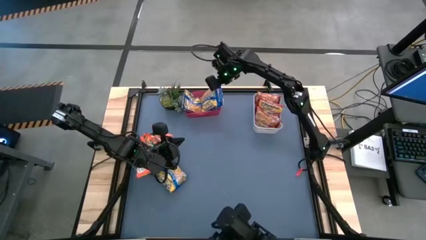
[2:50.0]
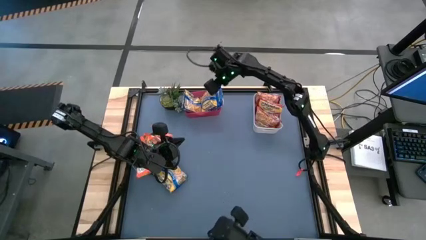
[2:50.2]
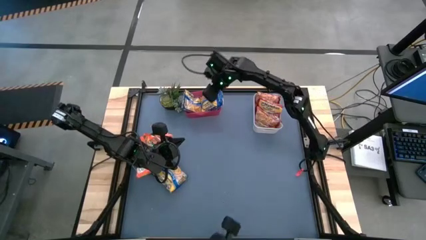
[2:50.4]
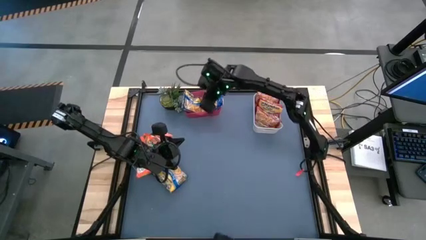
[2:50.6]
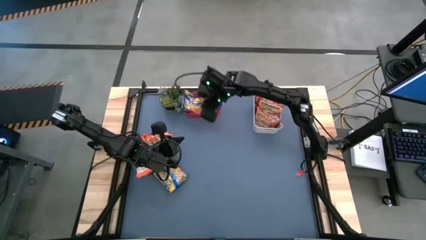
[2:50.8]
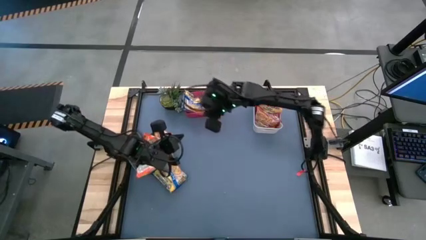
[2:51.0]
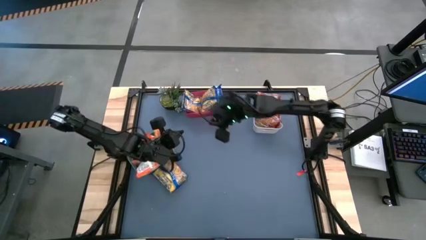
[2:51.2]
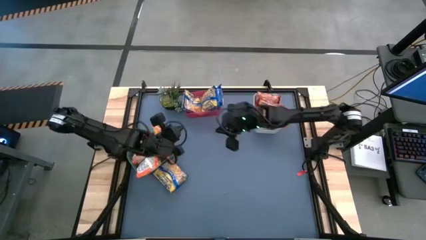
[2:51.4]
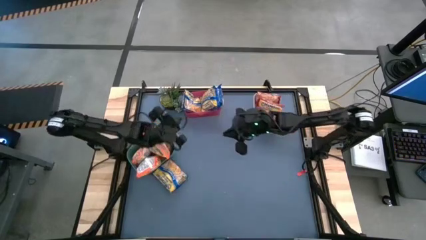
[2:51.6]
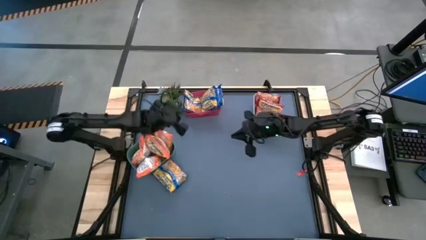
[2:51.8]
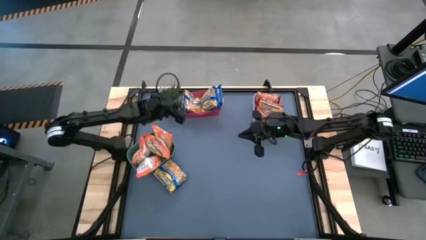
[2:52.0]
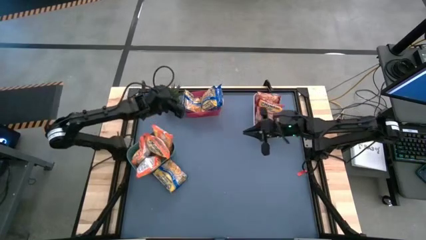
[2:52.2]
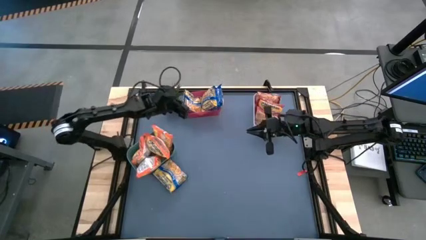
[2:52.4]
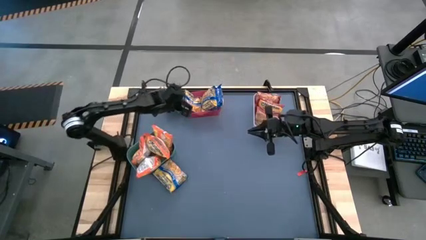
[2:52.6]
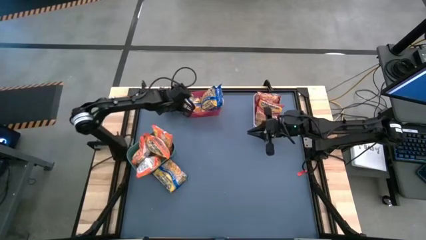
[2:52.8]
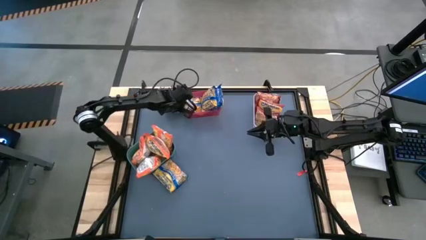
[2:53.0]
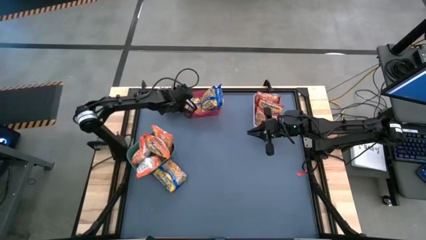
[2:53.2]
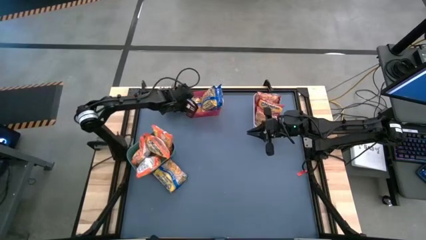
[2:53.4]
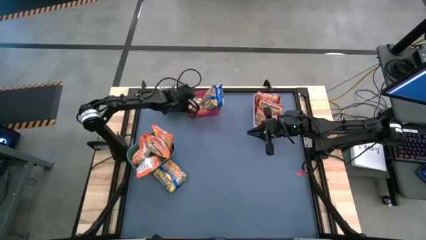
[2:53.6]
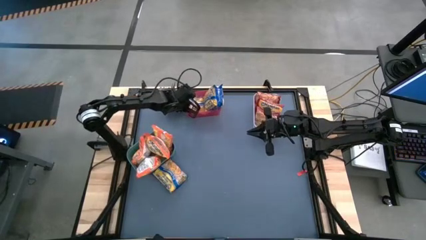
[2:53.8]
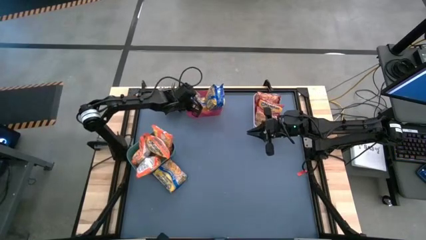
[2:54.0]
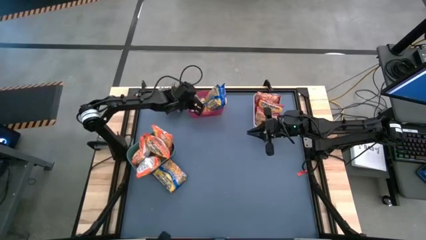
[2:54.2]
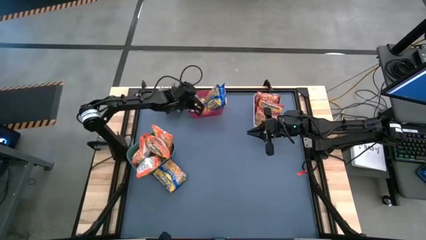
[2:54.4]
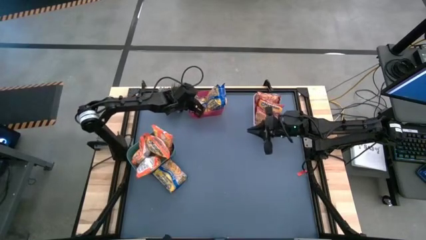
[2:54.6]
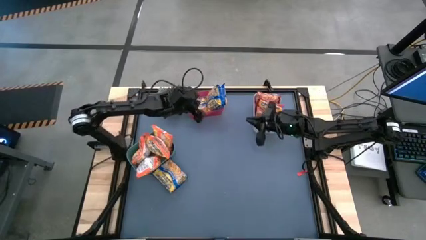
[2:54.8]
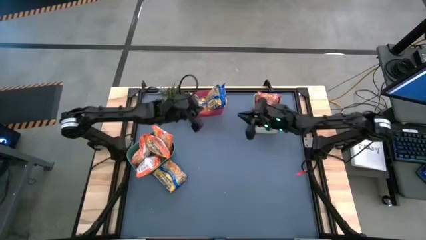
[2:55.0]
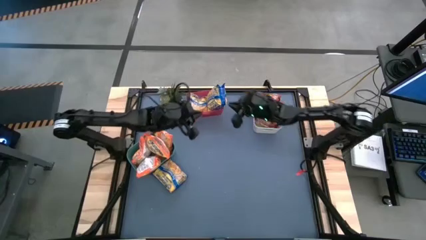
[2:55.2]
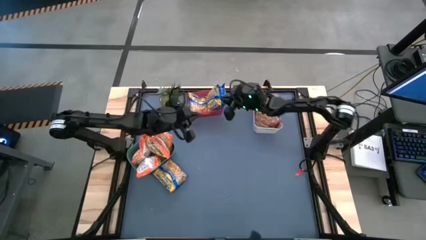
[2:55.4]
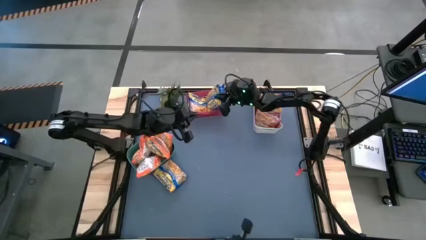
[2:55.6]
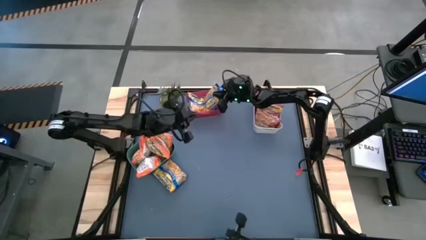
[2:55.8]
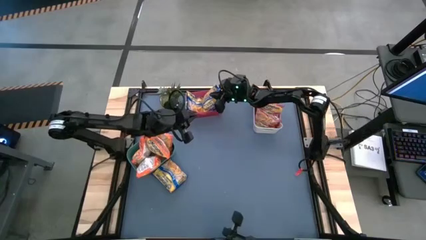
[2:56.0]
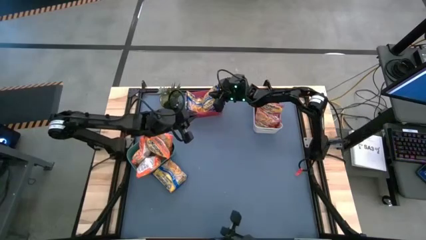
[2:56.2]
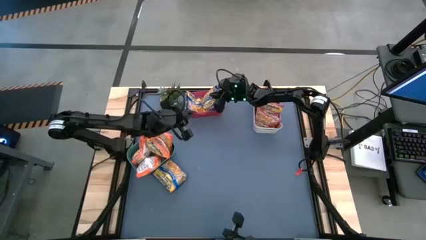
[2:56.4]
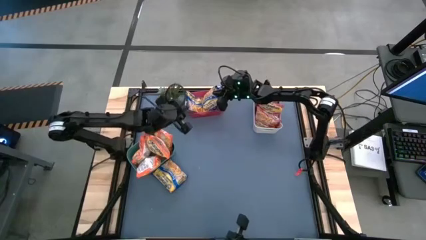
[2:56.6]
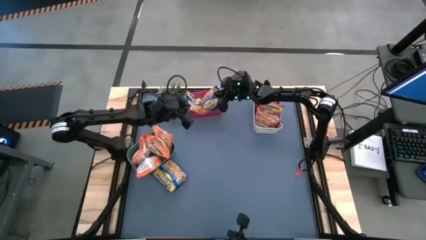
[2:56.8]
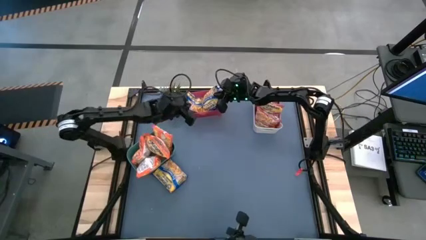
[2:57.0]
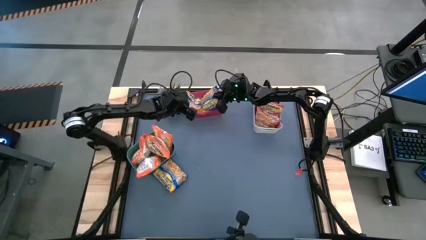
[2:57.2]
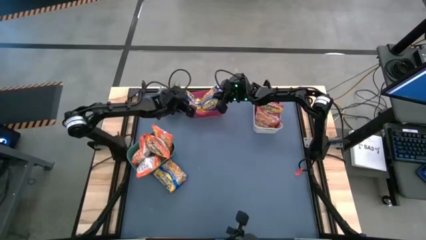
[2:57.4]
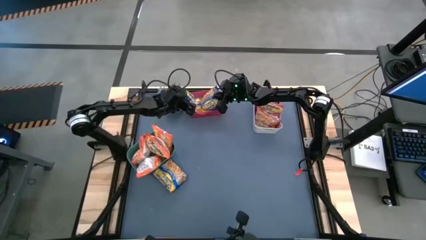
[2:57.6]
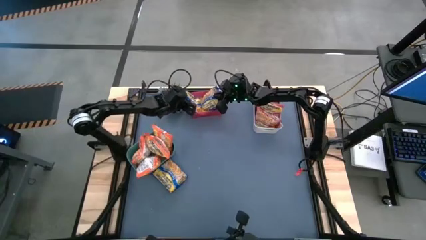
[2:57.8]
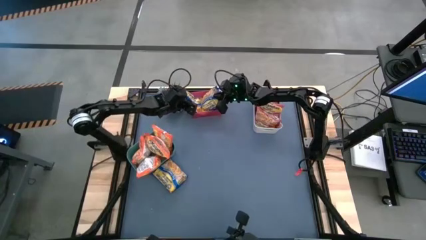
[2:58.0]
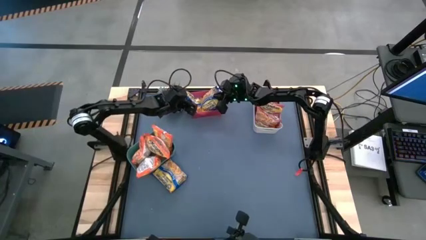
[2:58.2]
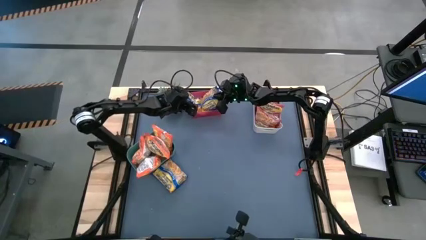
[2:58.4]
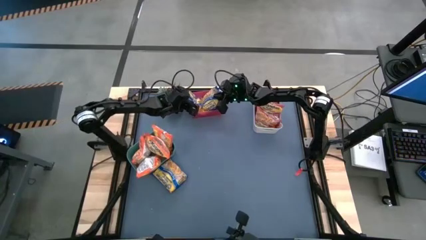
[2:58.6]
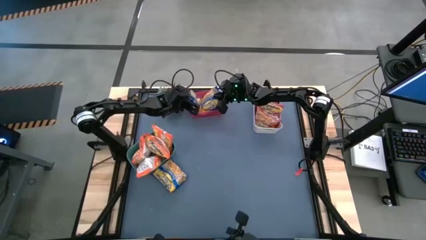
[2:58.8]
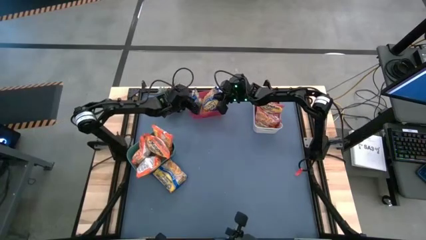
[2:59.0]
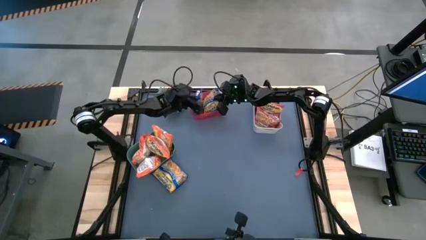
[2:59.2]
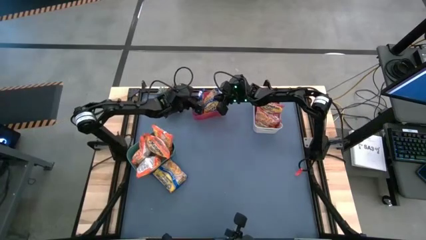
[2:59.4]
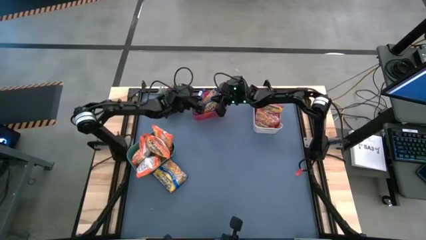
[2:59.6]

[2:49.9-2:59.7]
Task: Sort Maruchan noodles
Adjust the blue noodle packs in the red bin

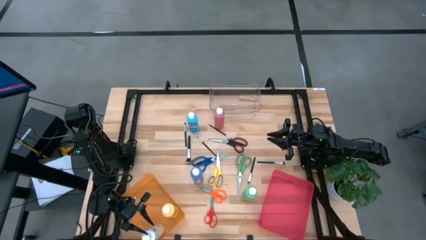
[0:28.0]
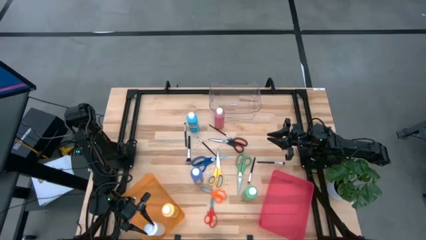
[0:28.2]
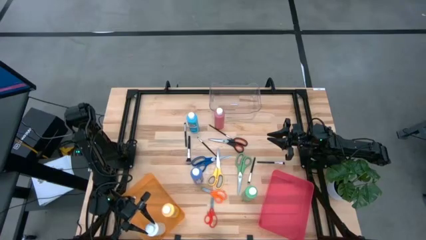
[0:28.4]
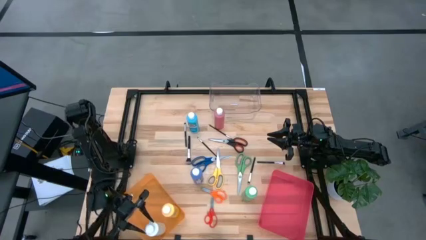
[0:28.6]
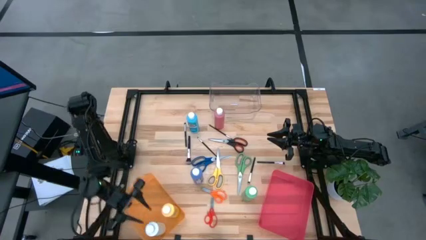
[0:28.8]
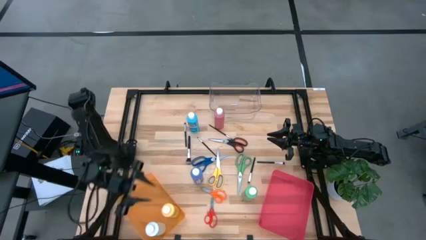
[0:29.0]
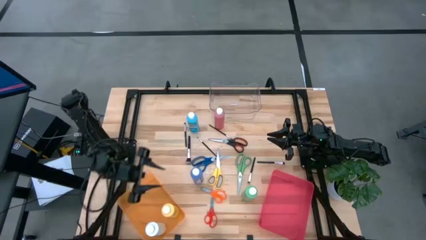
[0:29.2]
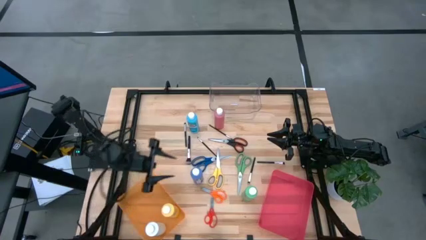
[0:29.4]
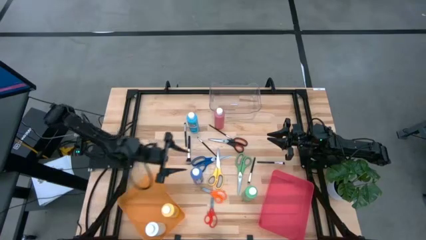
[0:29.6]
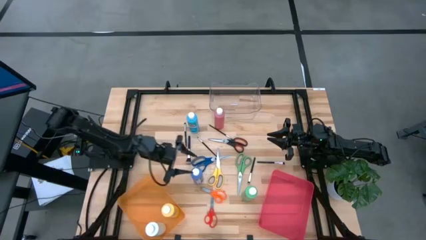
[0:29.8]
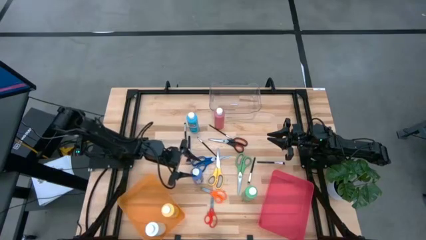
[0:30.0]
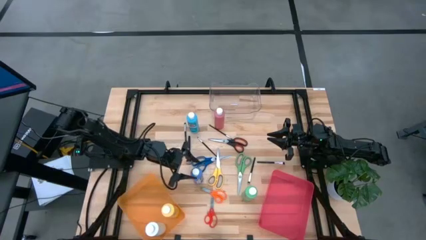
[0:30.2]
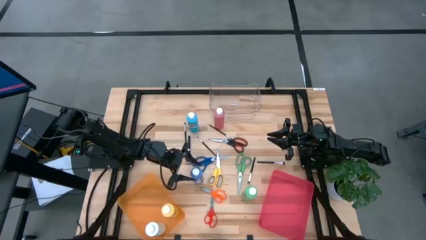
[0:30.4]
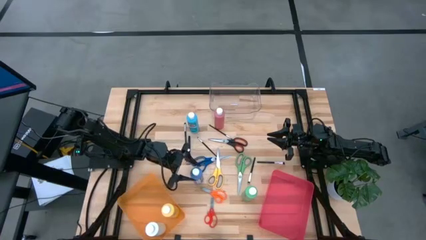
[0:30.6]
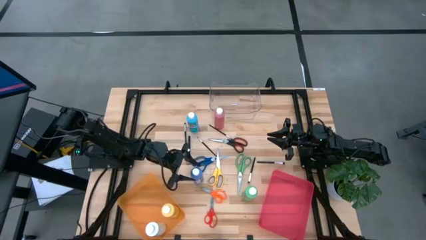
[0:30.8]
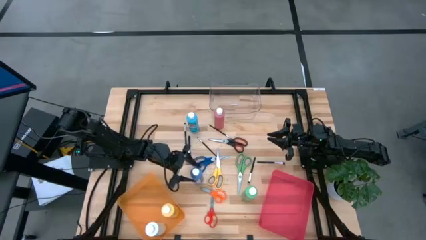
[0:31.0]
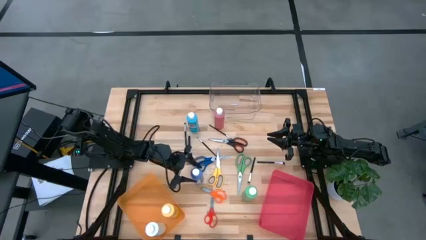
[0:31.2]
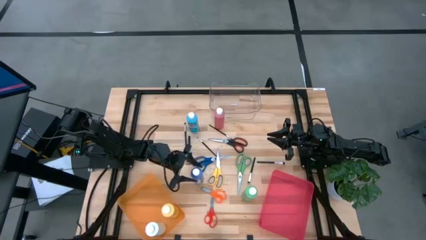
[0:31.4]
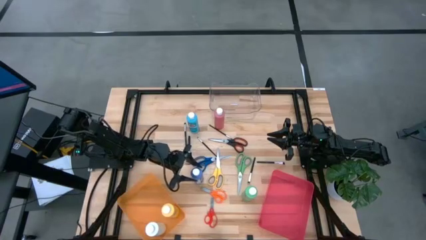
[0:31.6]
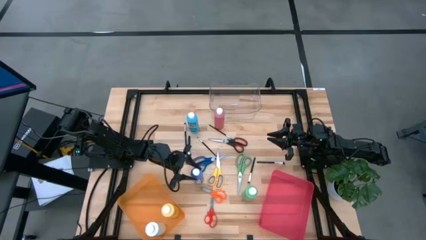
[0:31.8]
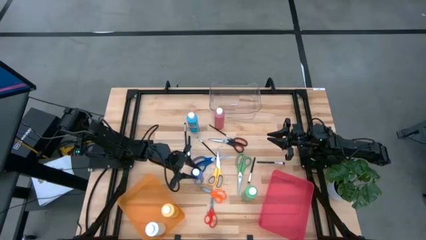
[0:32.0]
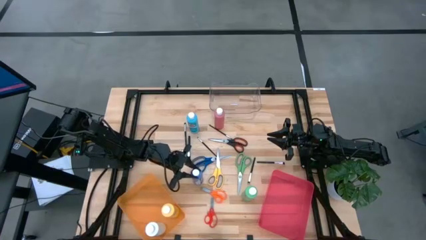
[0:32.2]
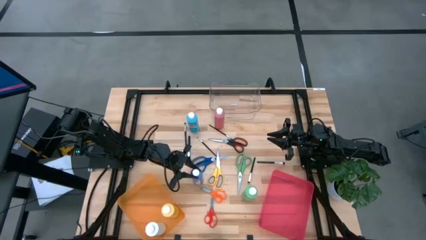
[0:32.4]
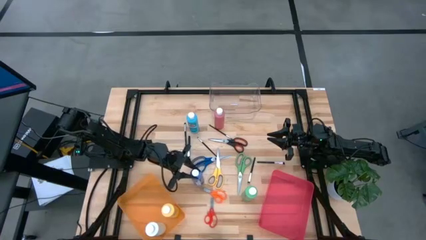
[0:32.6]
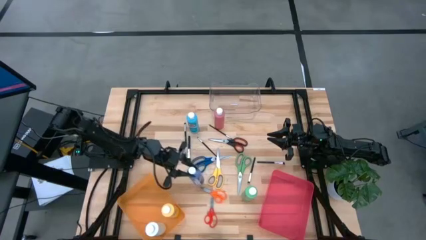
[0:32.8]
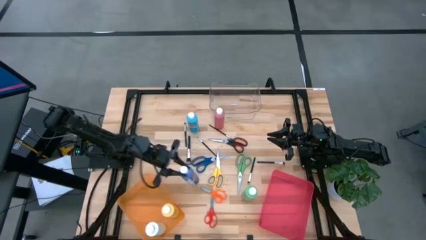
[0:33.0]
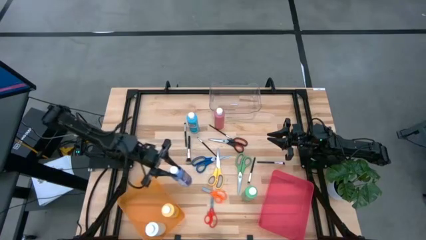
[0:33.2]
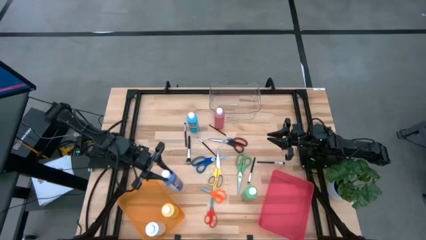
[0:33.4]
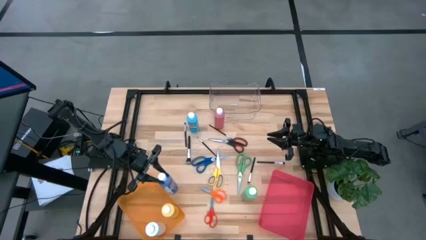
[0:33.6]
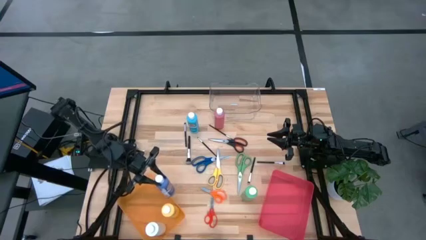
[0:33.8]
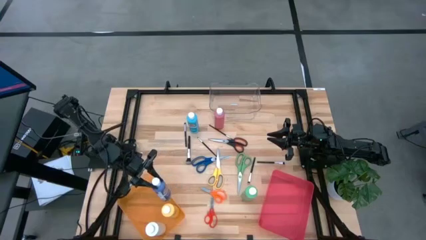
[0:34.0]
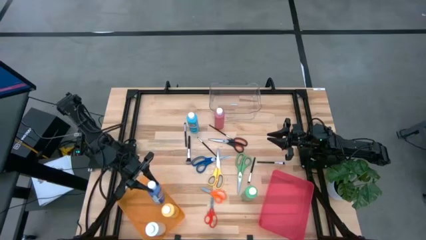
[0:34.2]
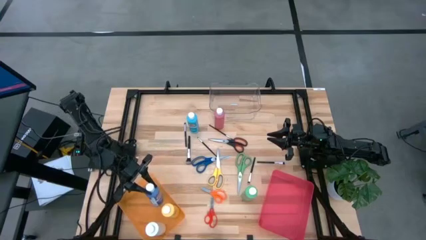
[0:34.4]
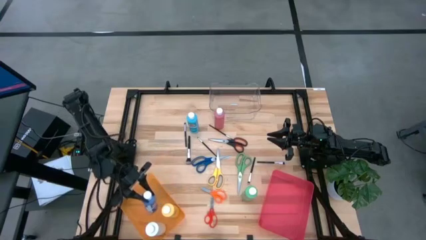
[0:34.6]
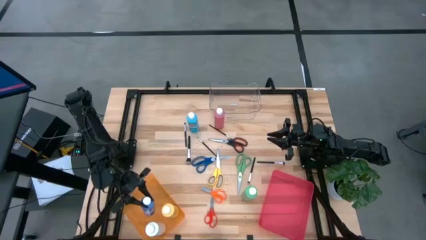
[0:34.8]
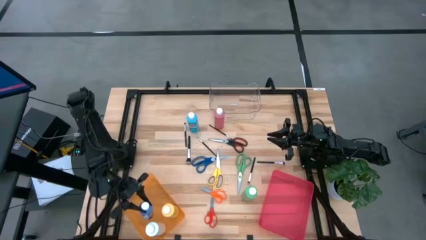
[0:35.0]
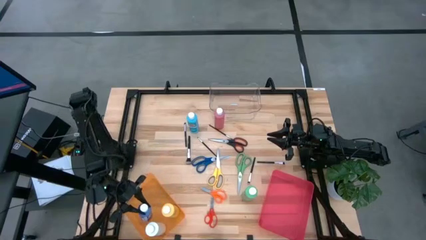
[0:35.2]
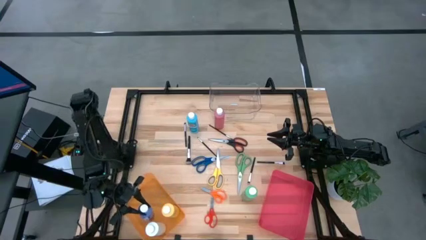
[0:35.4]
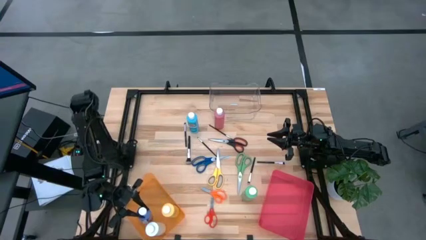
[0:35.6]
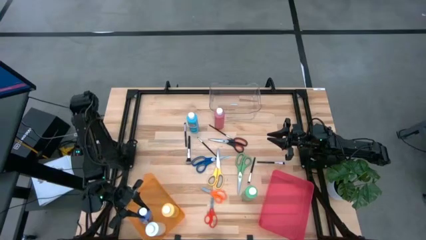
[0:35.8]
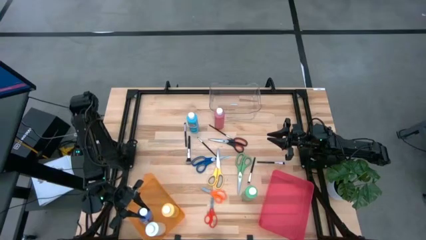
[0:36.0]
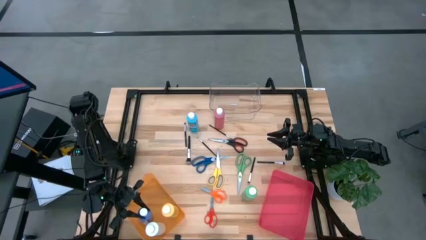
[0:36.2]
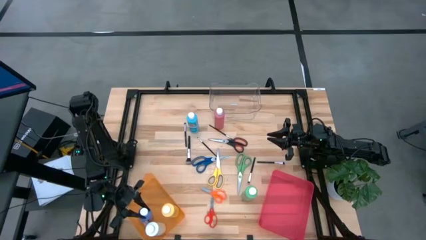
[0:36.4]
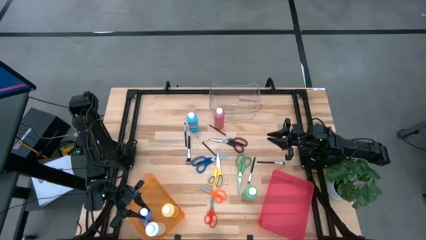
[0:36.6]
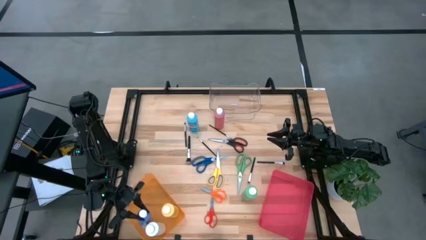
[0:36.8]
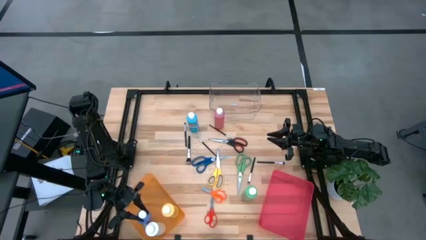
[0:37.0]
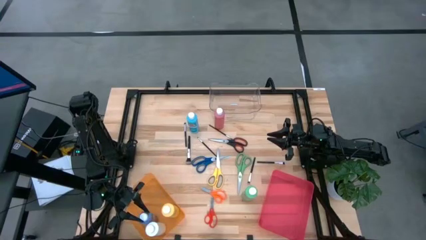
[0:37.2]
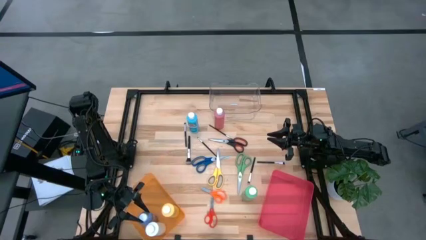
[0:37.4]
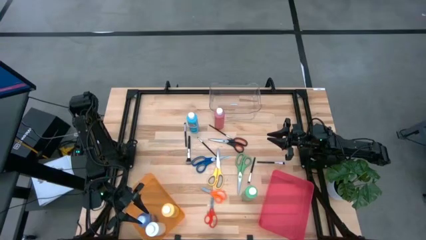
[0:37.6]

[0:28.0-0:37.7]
Task: Pick & Place Paint Supplies
Put the purple paint bottle into the orange bin
